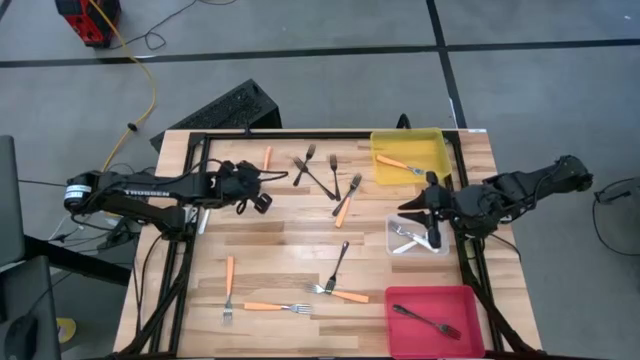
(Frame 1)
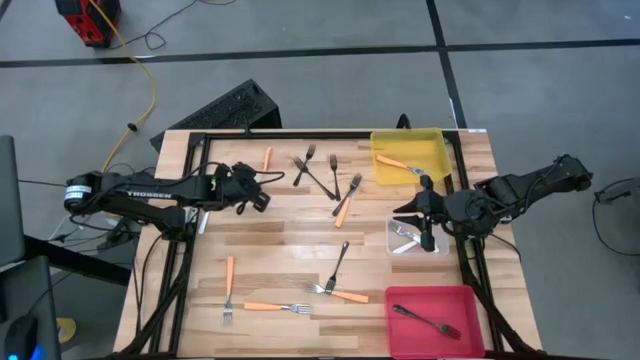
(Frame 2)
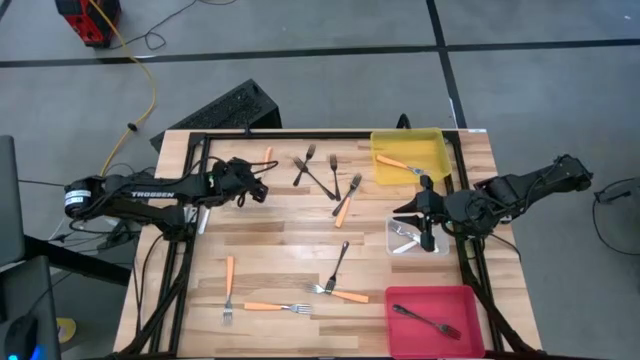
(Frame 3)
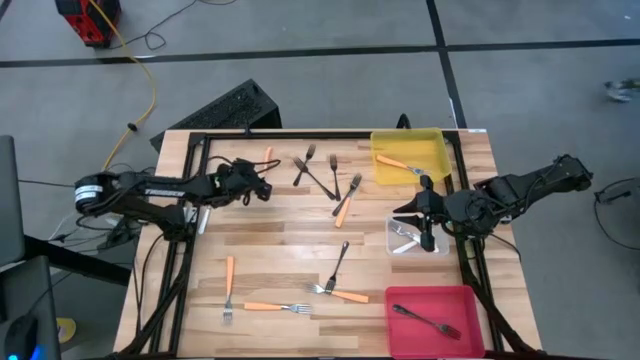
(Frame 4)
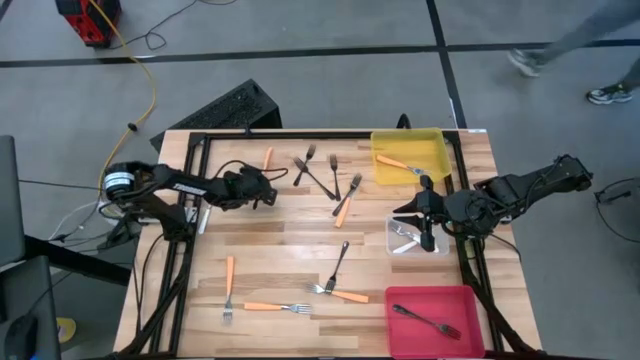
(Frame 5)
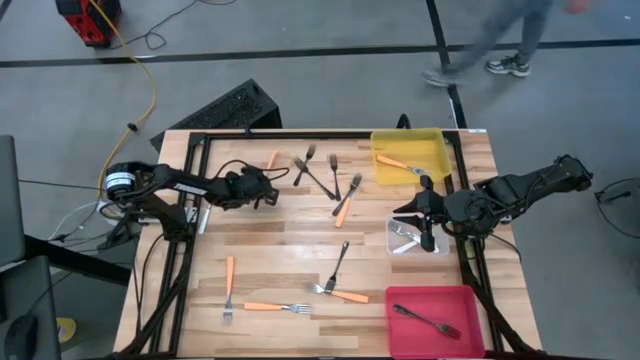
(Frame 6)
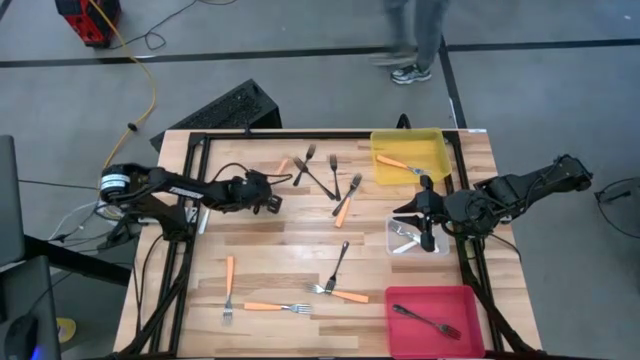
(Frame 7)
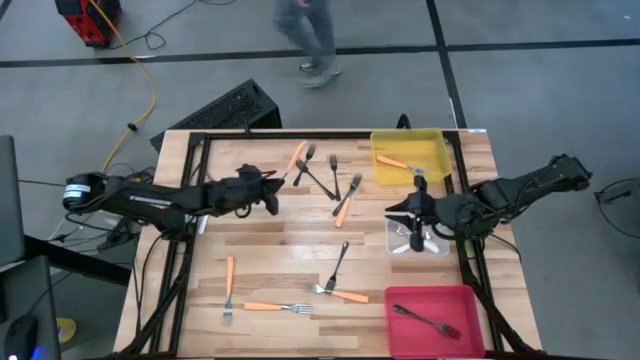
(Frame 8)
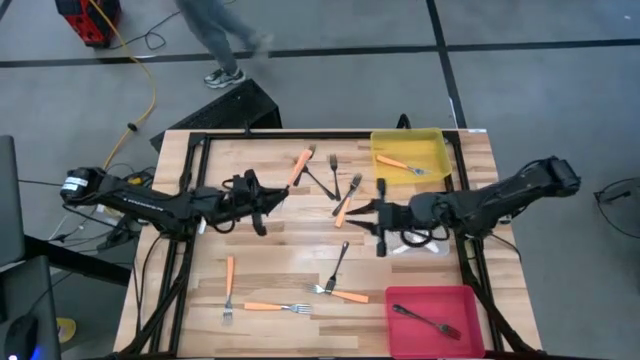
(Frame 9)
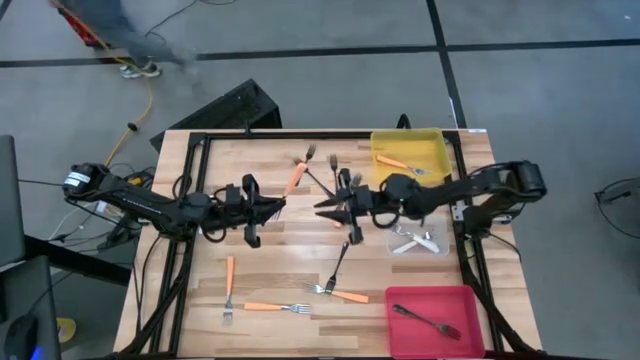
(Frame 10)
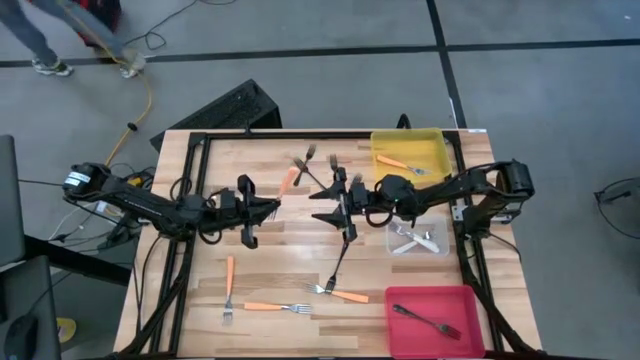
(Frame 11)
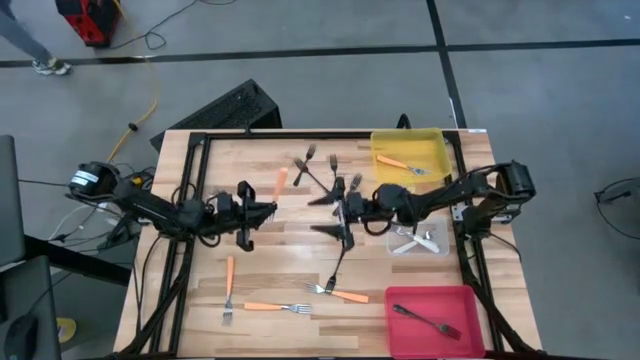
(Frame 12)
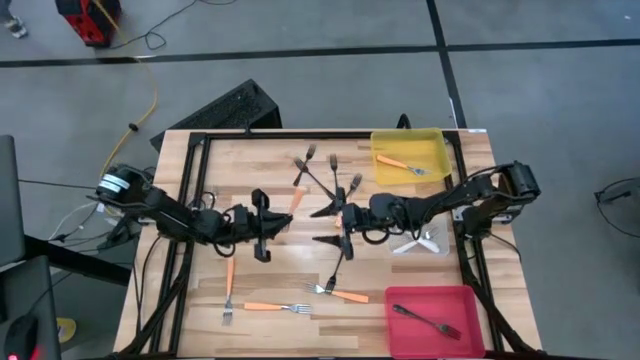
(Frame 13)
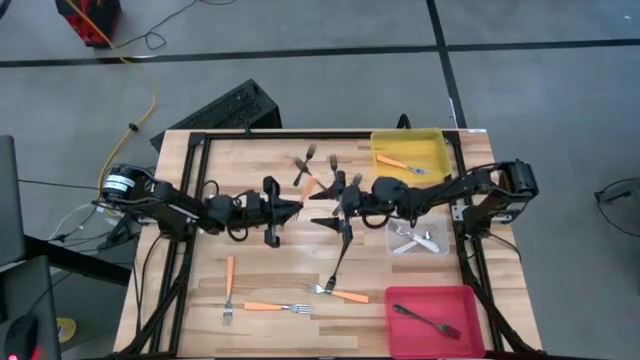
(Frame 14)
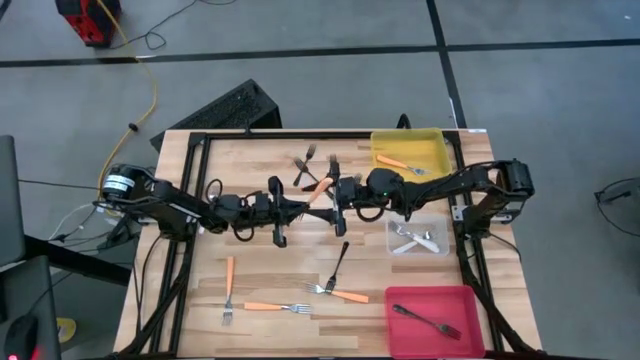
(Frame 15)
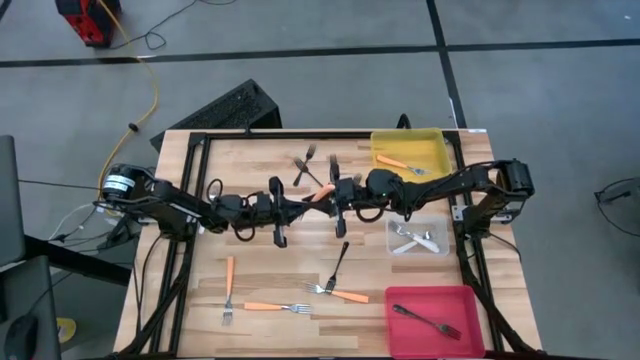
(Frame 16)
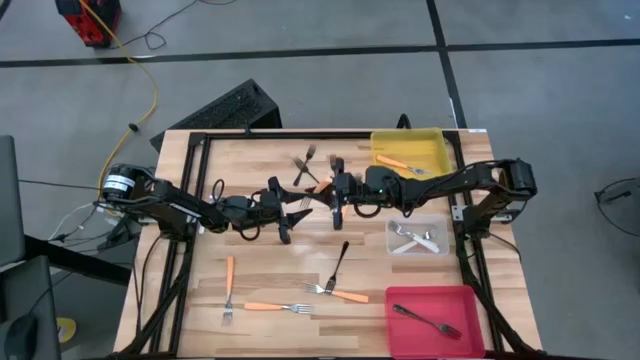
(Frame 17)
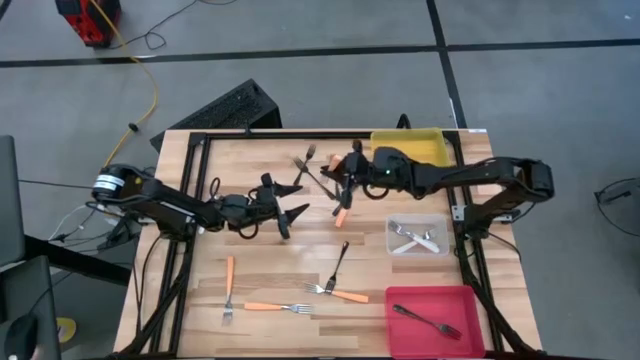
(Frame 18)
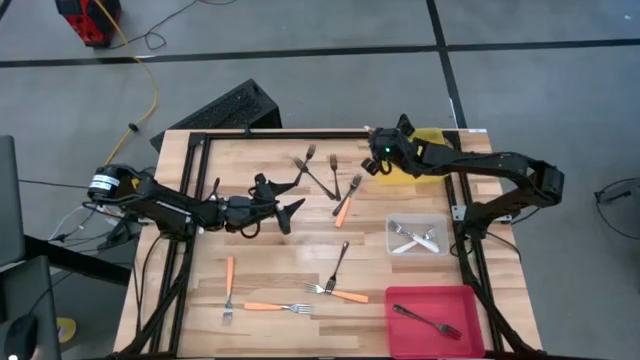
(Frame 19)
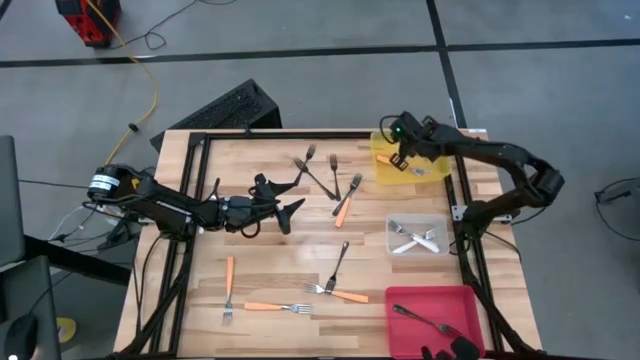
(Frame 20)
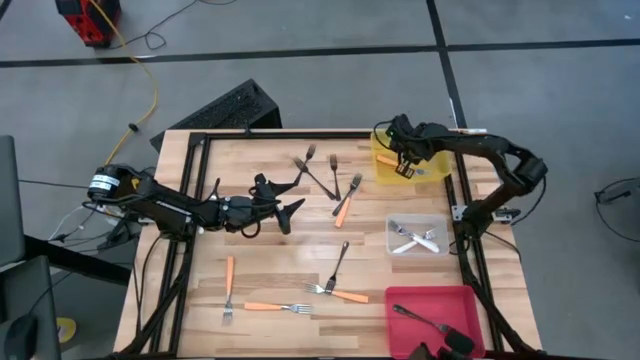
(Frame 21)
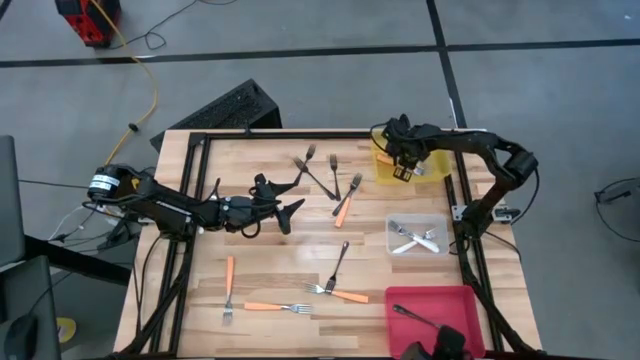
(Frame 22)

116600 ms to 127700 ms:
Task: Sort silverware by color (type)
Put the orange fork into the yellow bin

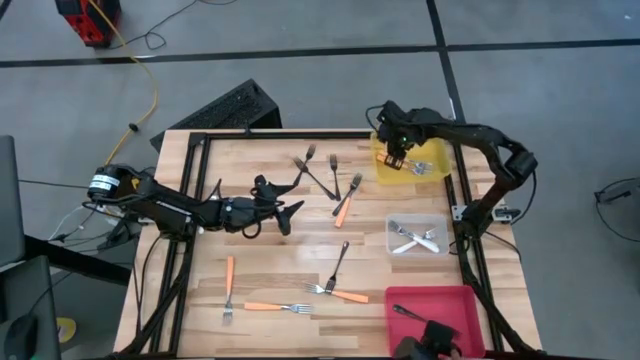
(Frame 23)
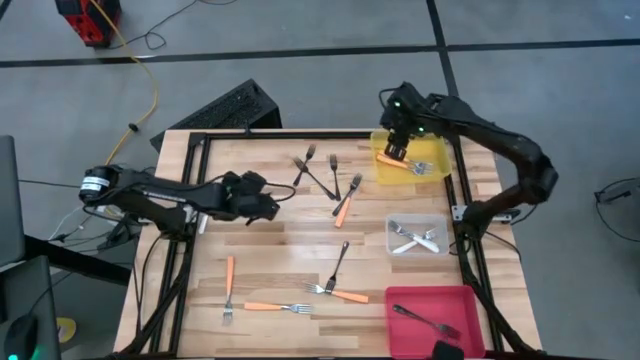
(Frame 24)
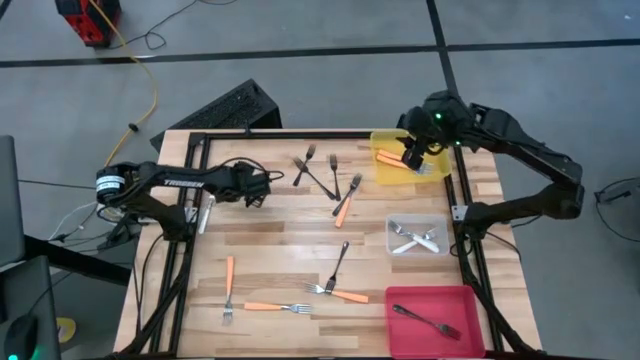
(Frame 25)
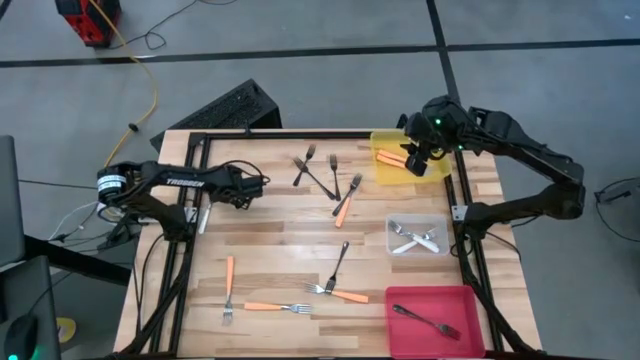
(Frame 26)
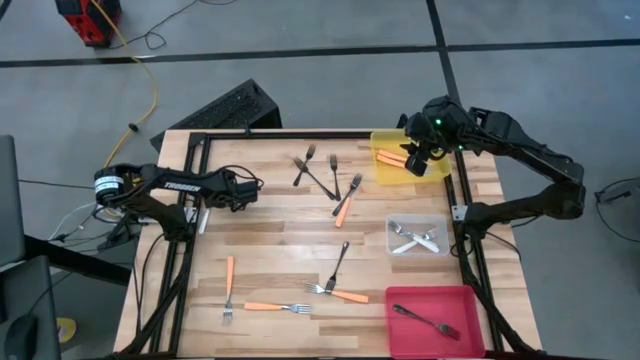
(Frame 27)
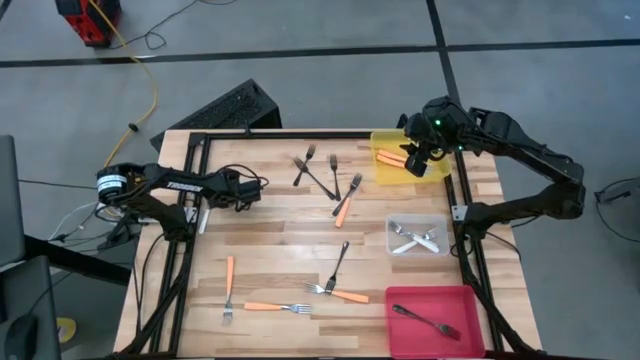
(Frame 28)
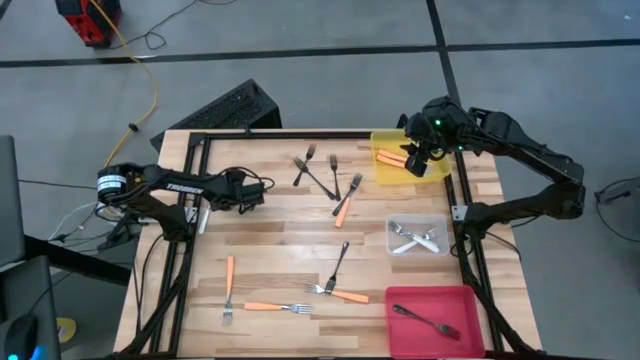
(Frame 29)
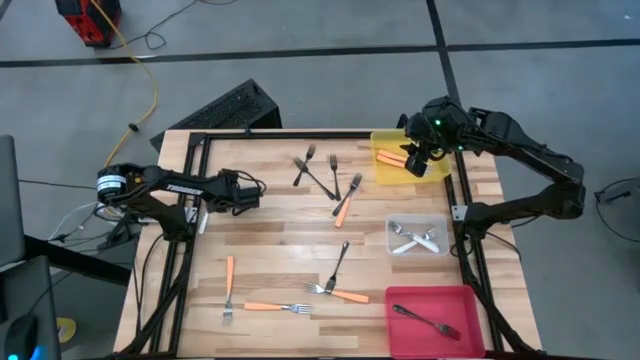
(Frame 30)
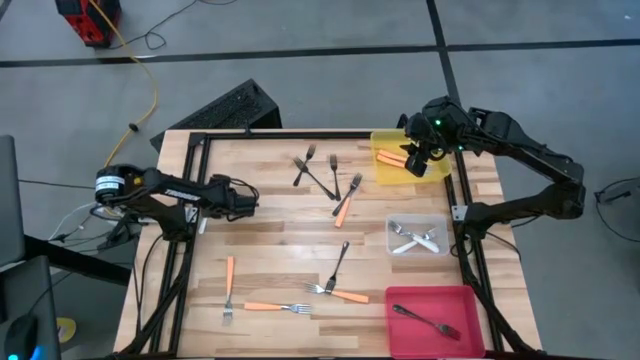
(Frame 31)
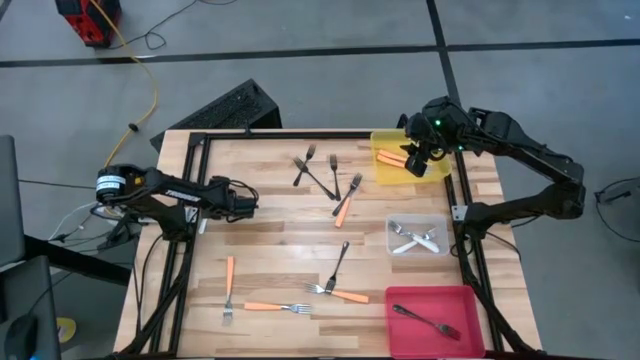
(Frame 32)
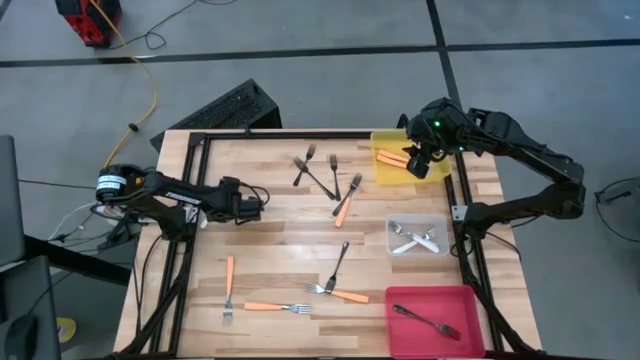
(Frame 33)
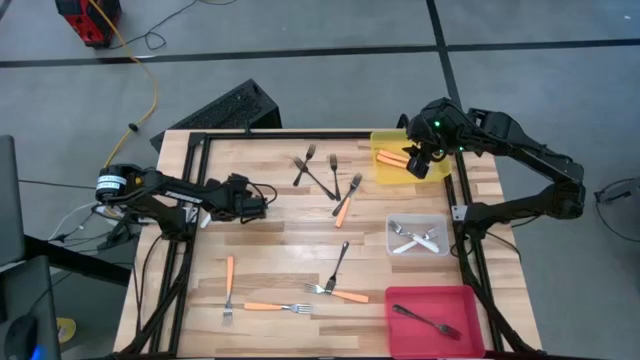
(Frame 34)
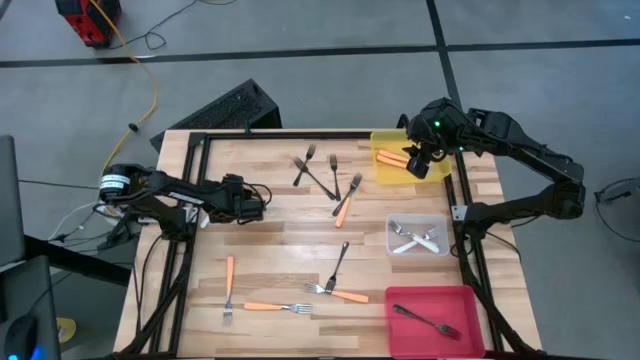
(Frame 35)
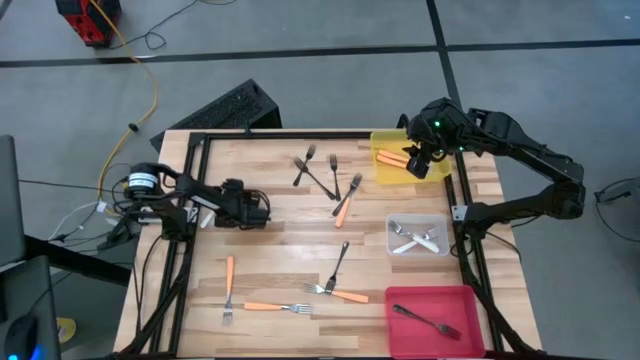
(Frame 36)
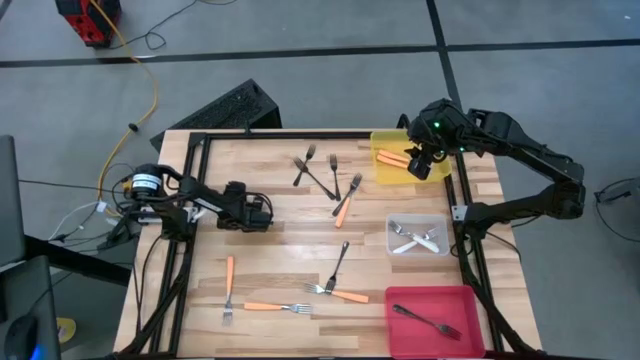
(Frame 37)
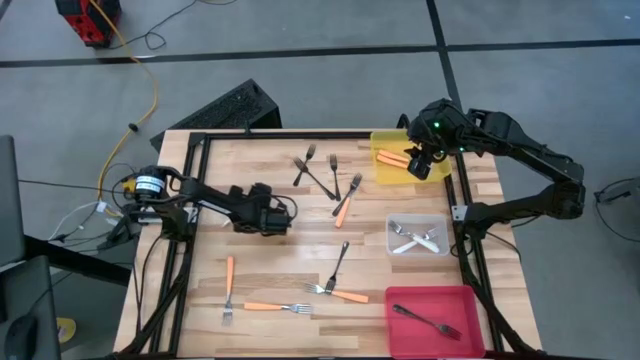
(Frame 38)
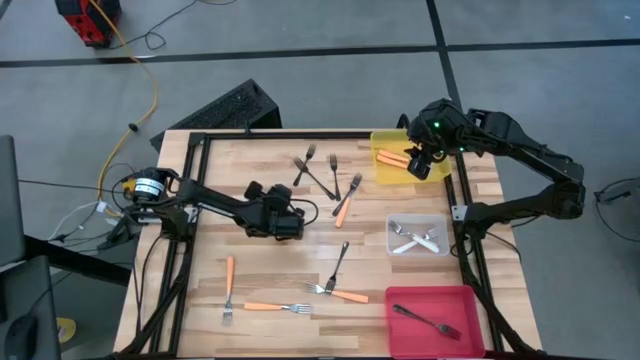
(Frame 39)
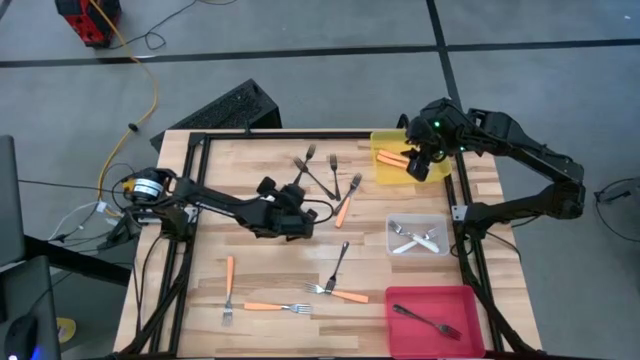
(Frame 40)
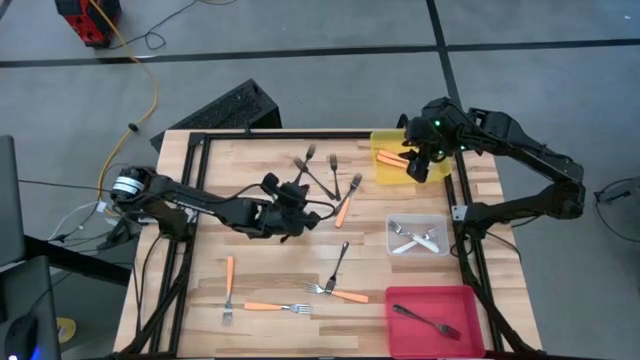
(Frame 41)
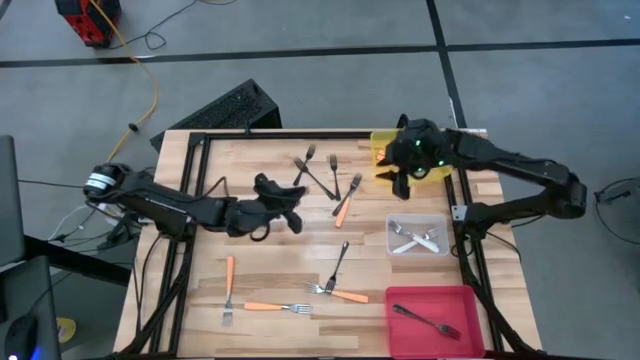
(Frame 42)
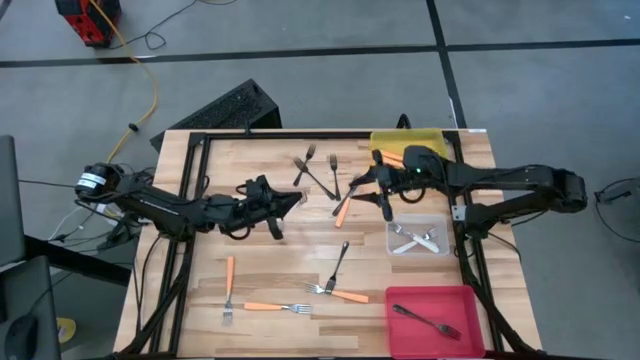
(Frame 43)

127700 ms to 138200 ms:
Put the white fork into the transparent bin
